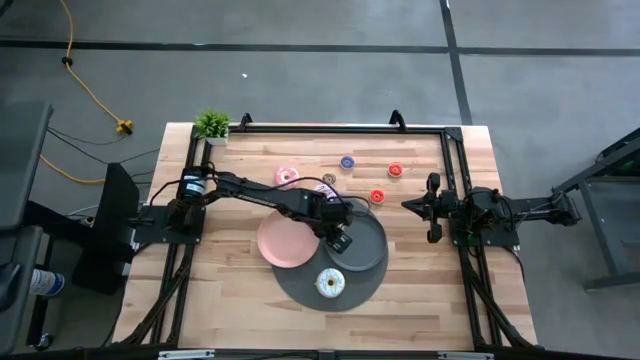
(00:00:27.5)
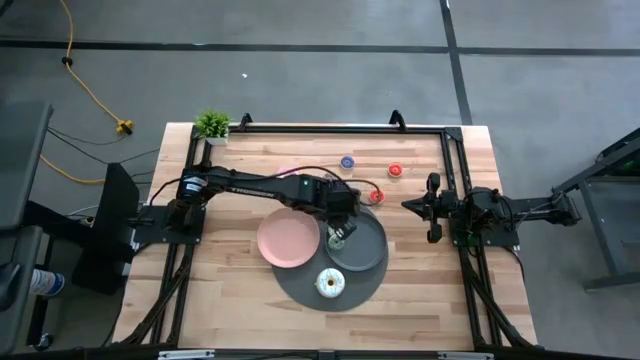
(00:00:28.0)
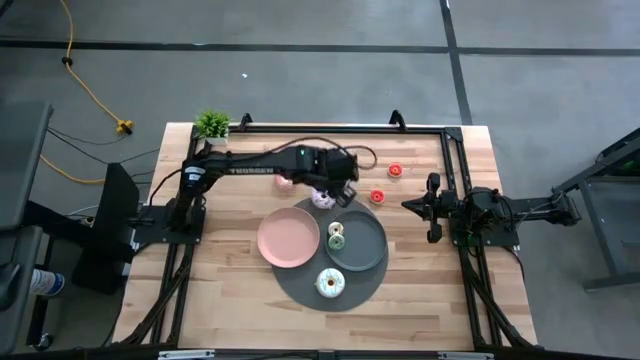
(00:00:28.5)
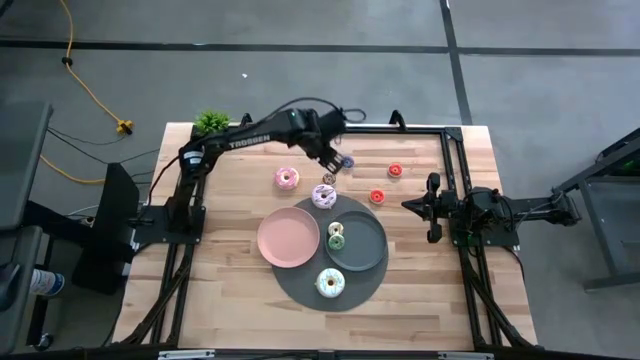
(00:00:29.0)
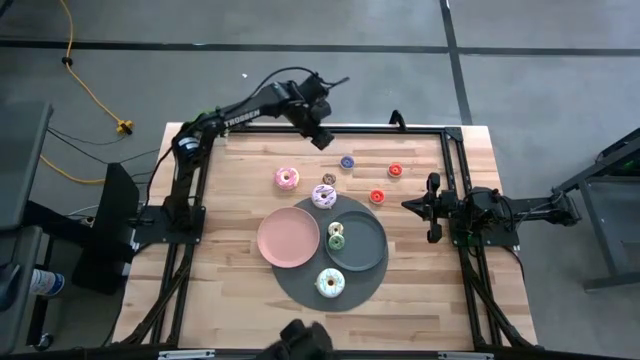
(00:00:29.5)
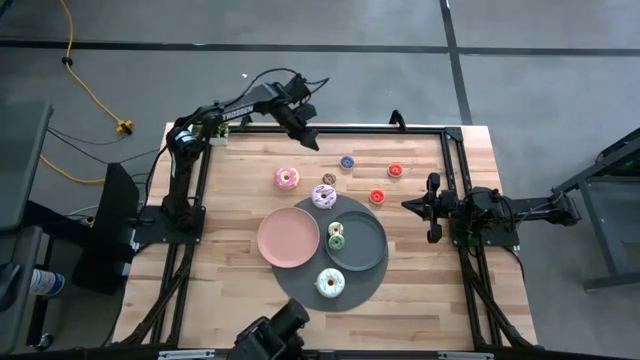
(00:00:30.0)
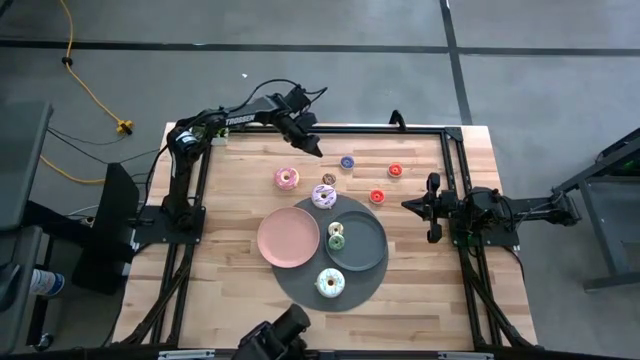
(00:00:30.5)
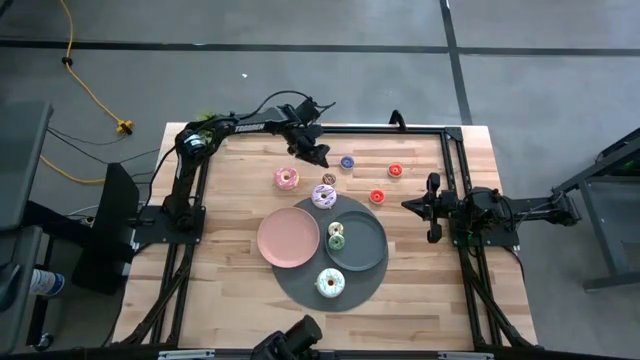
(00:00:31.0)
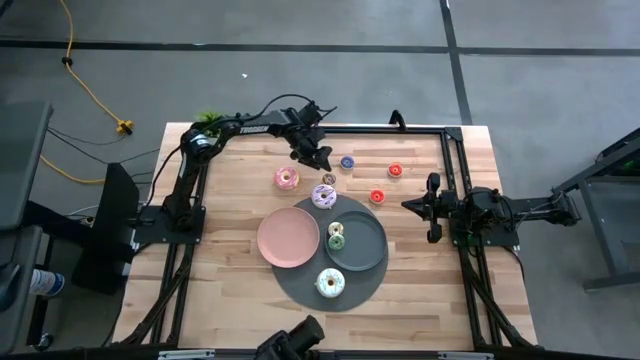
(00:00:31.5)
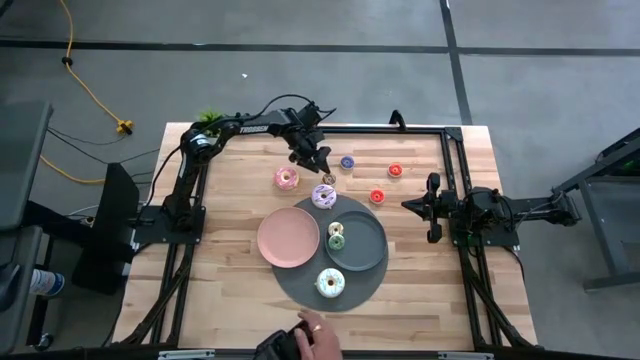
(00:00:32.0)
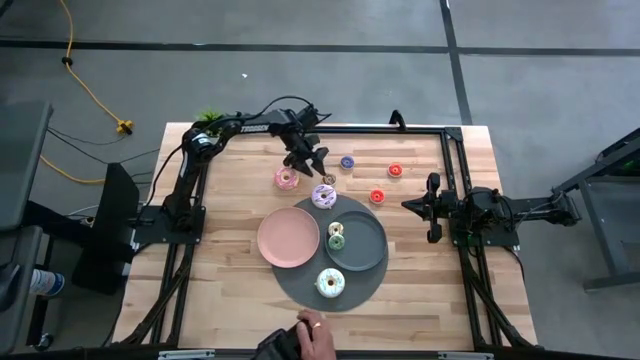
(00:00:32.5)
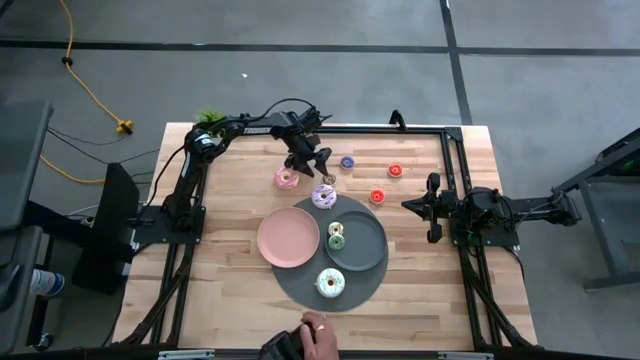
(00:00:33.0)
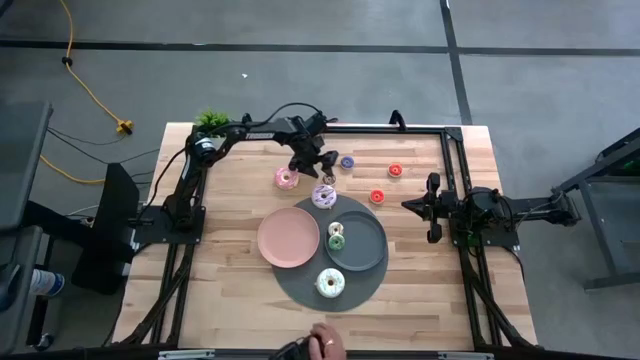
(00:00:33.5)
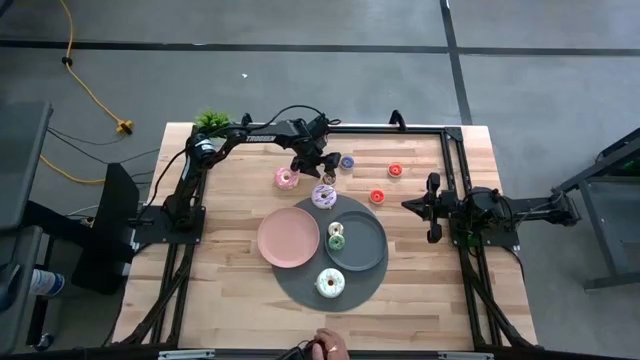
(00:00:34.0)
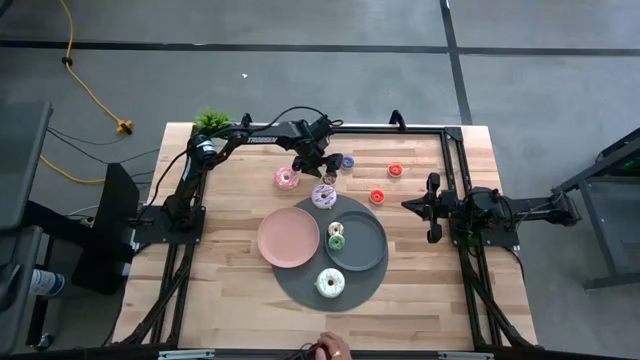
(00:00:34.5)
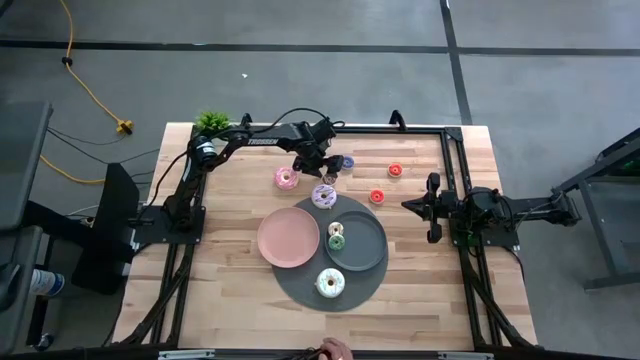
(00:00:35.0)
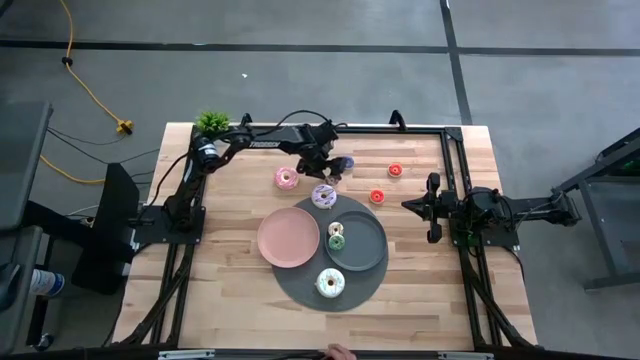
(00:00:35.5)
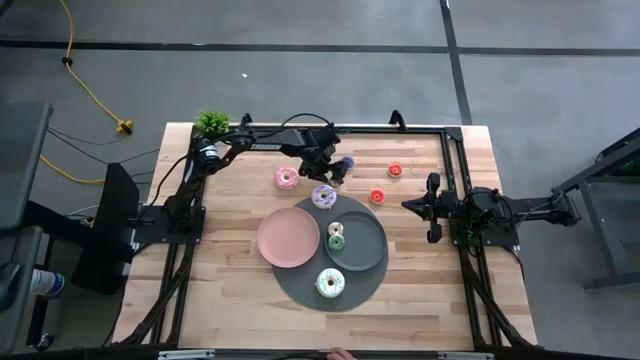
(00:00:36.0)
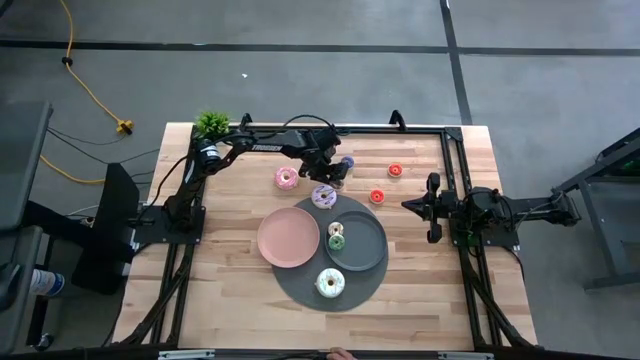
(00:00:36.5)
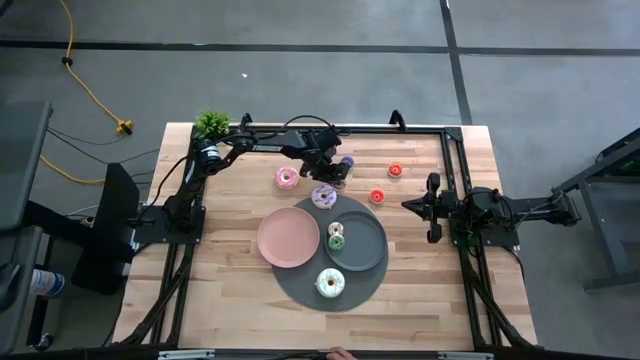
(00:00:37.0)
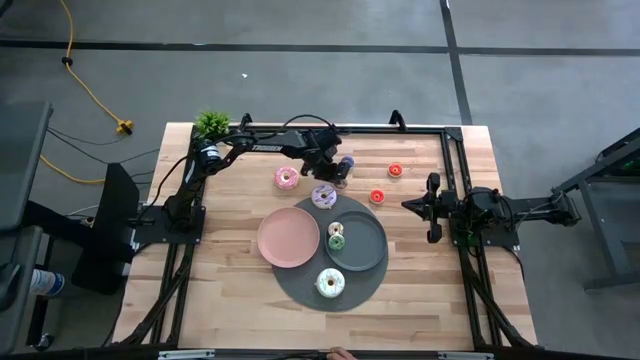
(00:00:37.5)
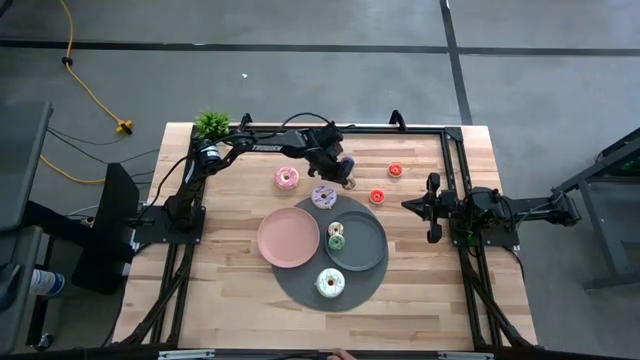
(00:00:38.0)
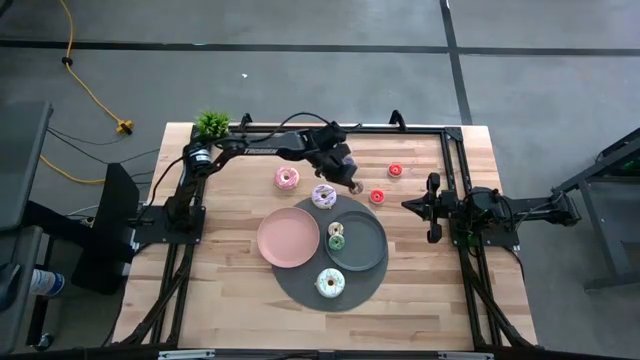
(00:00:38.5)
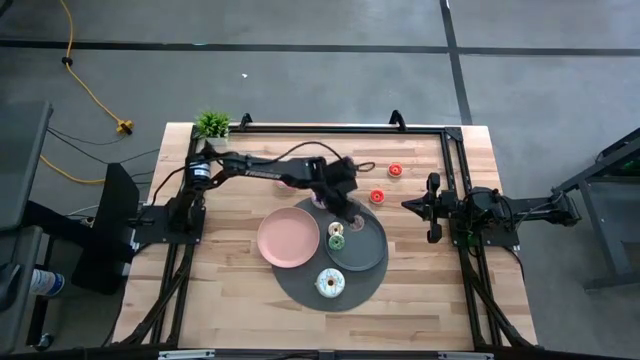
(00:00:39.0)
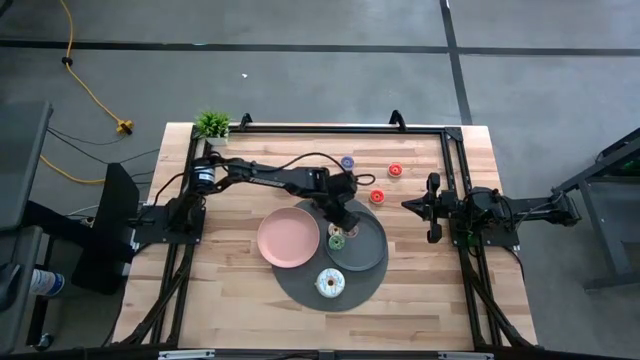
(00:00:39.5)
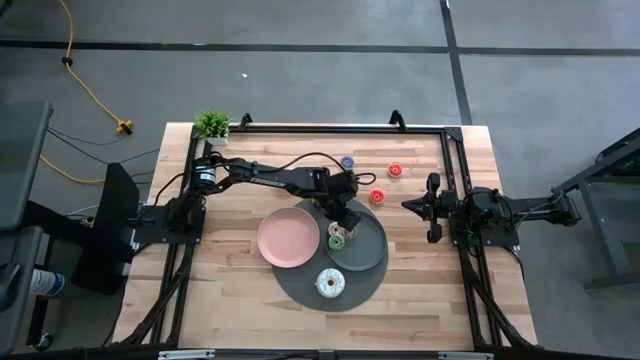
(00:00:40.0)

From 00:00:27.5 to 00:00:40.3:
Task: Pick & Place donuts
Put the small brown donut on the black plate

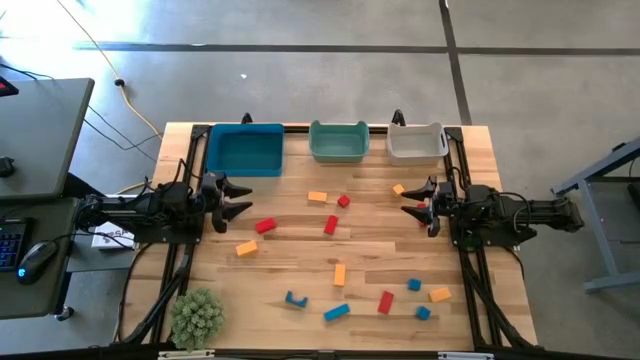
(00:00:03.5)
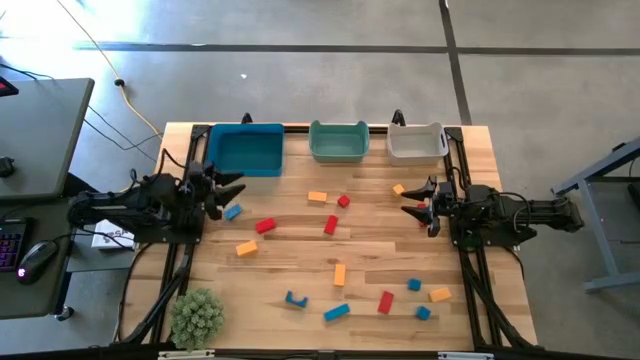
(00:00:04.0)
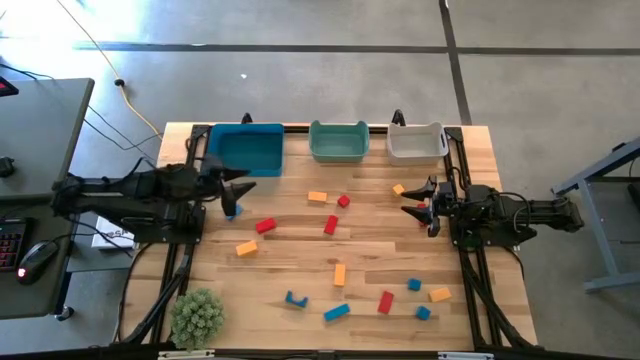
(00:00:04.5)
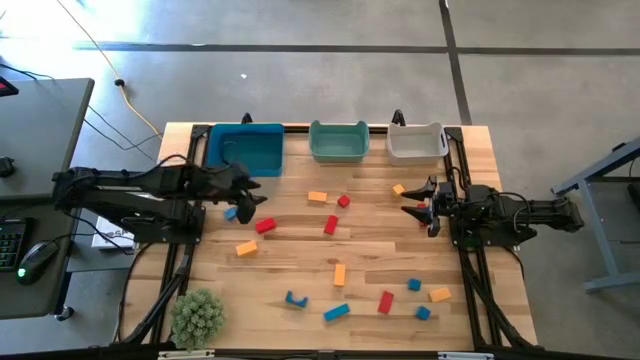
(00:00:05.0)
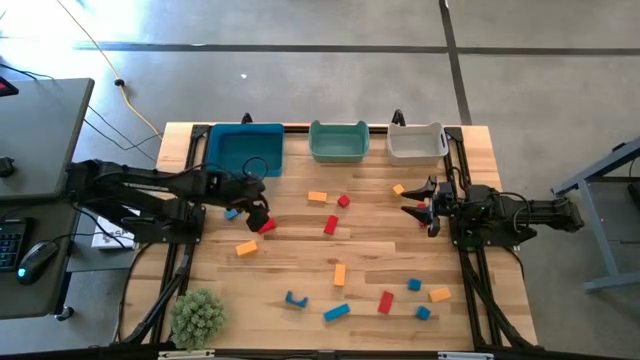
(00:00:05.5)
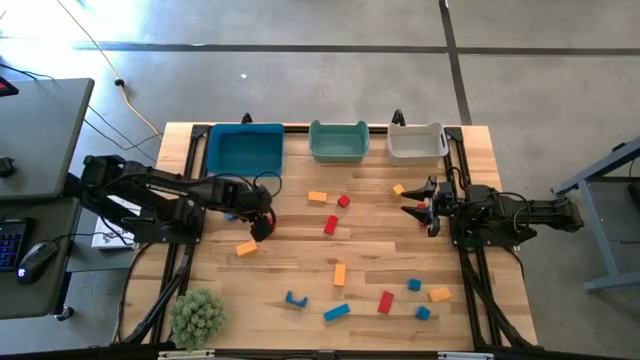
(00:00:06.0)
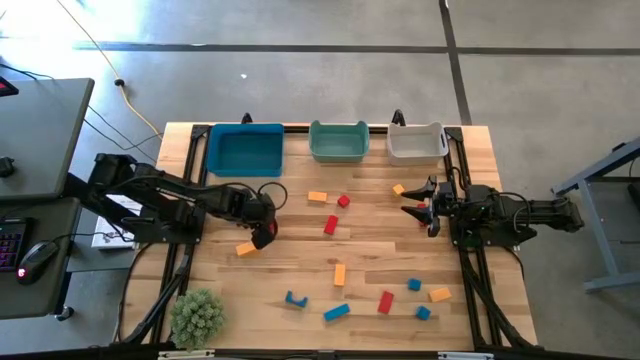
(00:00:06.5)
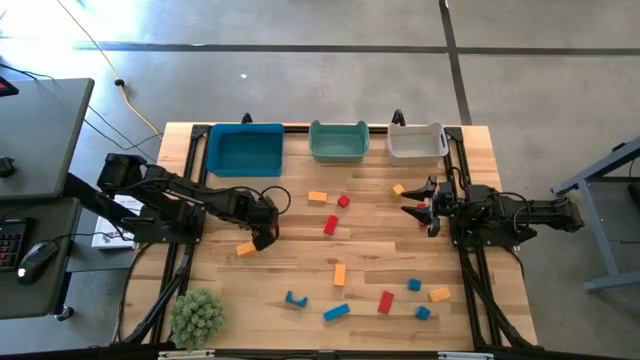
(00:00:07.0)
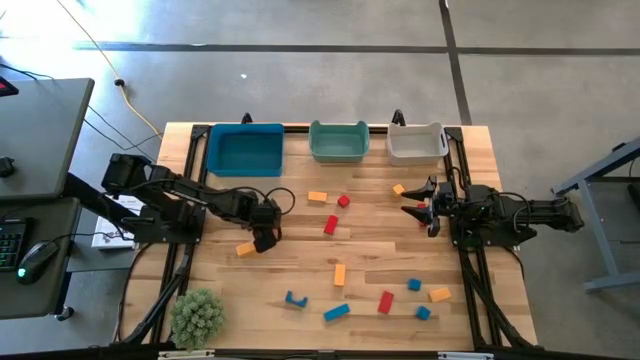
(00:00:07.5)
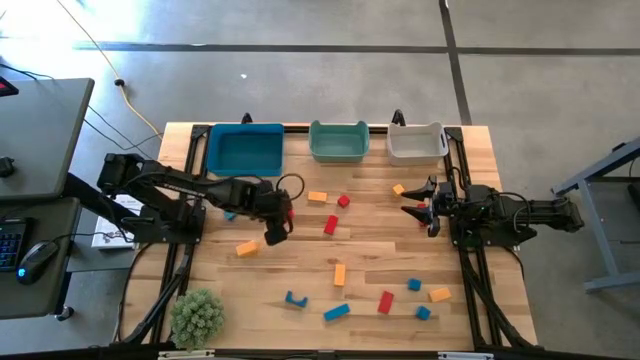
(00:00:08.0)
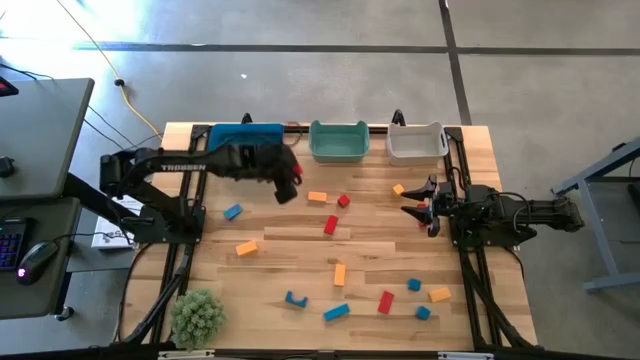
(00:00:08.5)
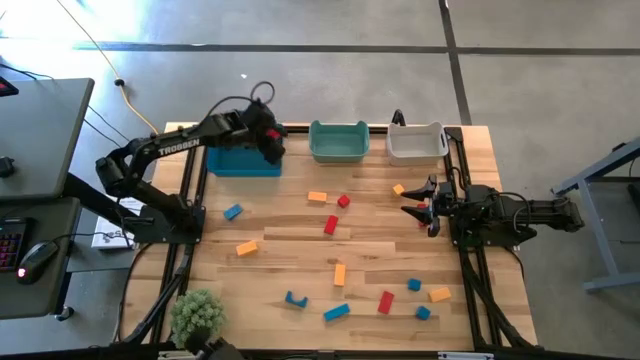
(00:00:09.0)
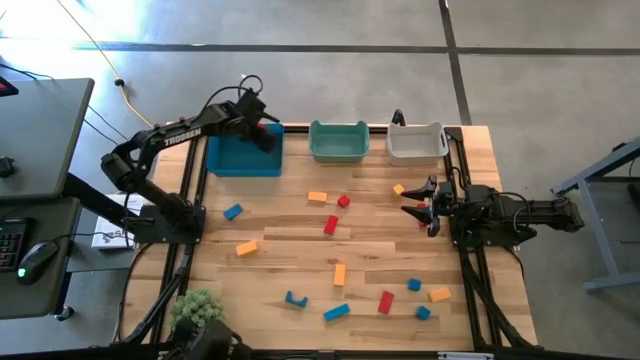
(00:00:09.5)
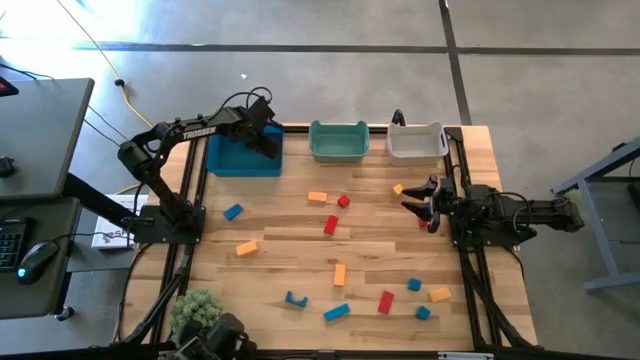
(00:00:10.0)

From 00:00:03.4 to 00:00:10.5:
Task: Sort & place blocks by color
Put the red block into the blue bin
